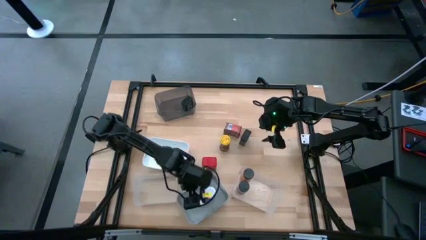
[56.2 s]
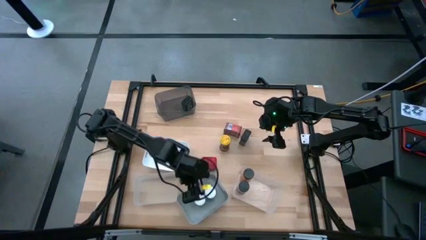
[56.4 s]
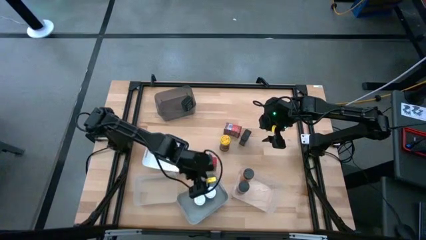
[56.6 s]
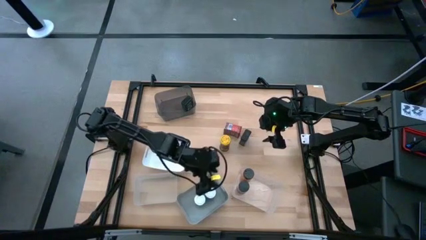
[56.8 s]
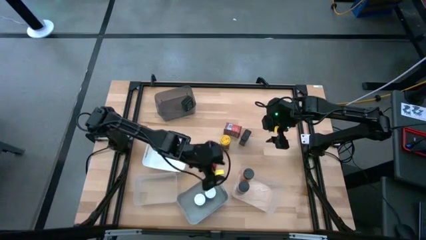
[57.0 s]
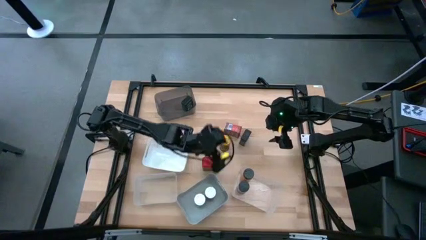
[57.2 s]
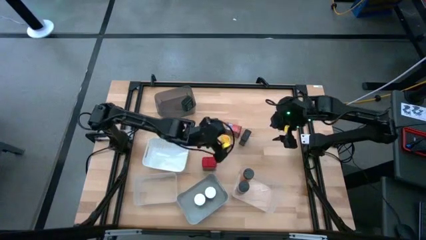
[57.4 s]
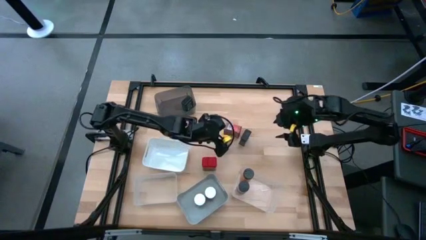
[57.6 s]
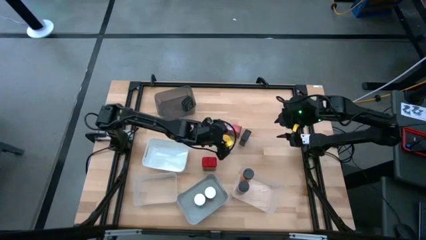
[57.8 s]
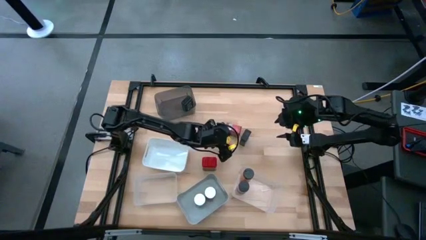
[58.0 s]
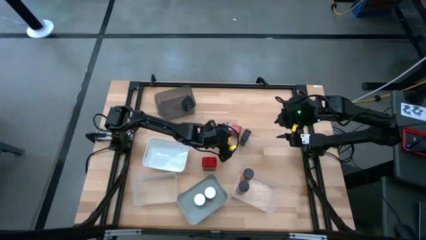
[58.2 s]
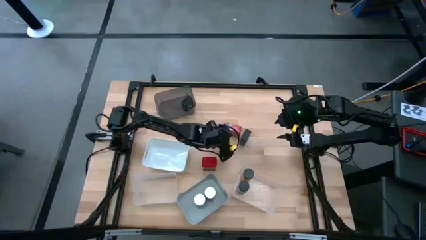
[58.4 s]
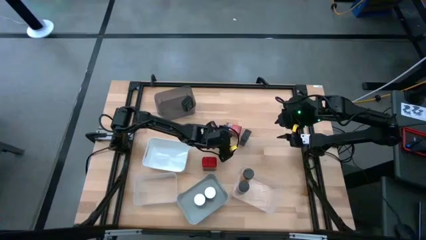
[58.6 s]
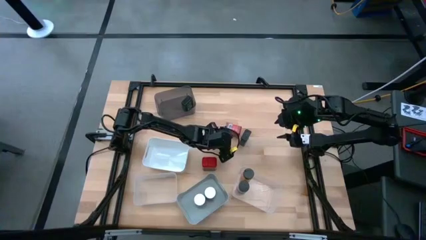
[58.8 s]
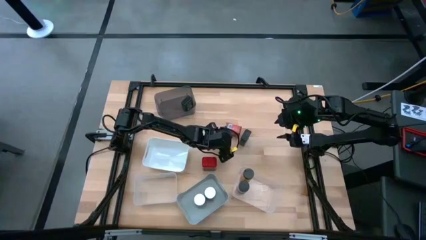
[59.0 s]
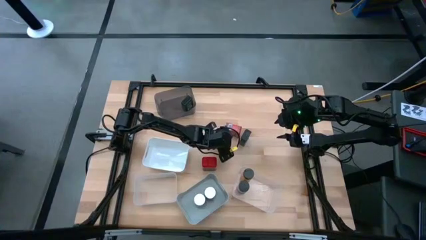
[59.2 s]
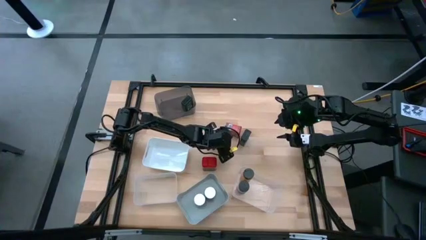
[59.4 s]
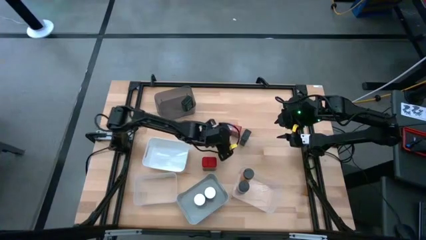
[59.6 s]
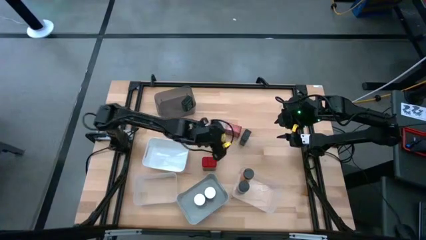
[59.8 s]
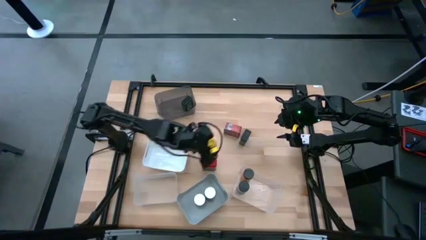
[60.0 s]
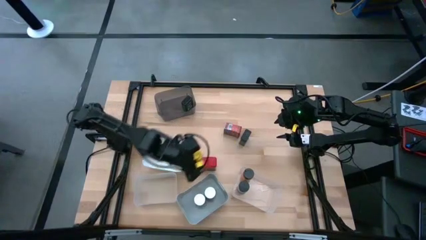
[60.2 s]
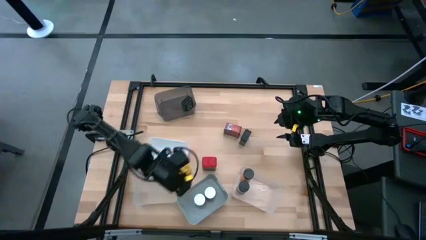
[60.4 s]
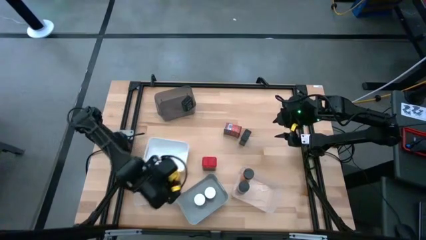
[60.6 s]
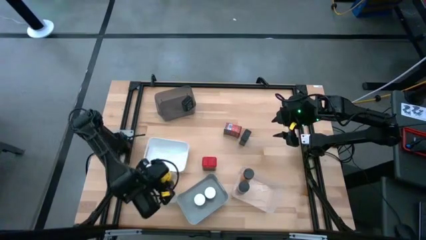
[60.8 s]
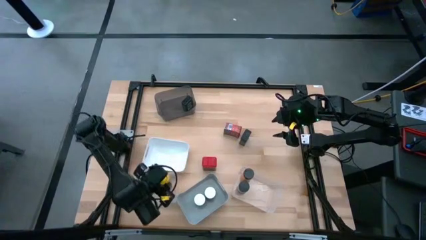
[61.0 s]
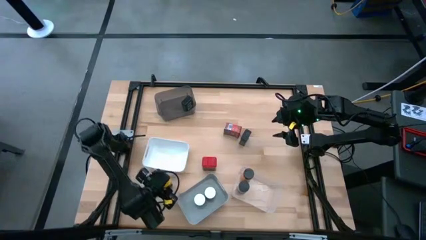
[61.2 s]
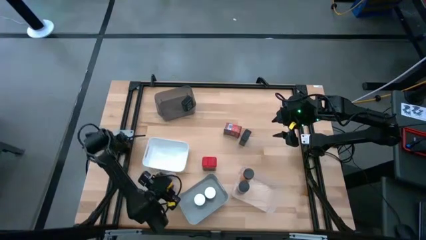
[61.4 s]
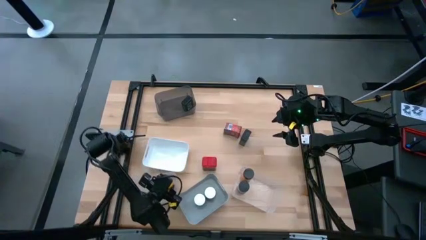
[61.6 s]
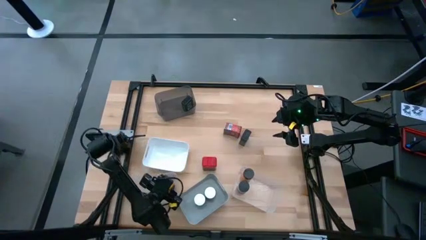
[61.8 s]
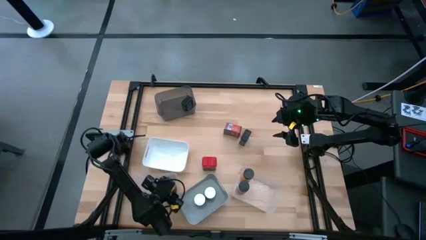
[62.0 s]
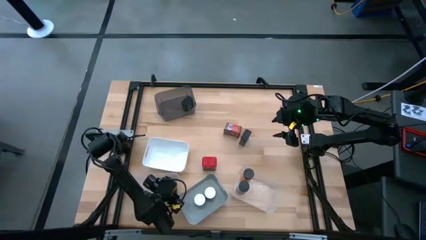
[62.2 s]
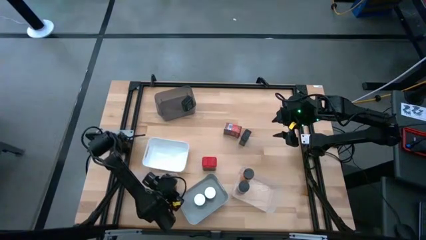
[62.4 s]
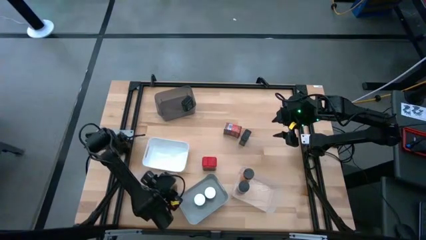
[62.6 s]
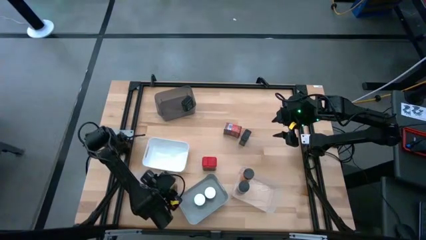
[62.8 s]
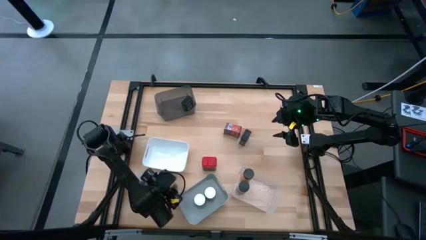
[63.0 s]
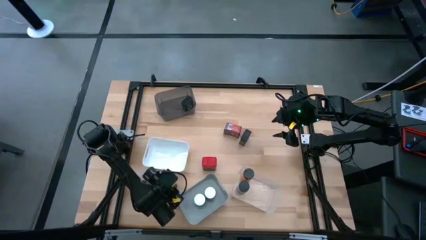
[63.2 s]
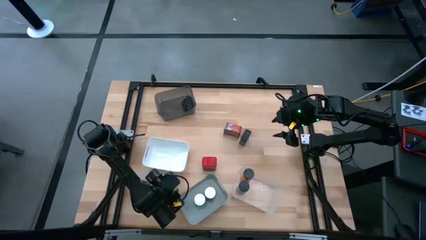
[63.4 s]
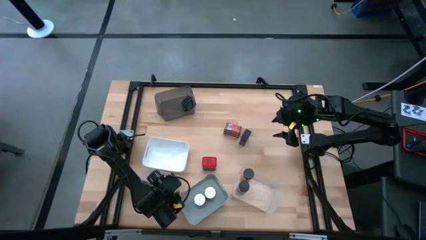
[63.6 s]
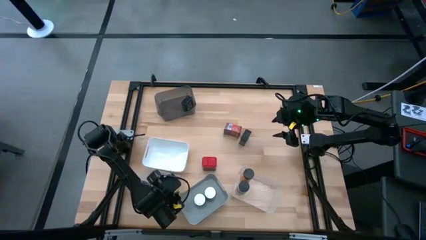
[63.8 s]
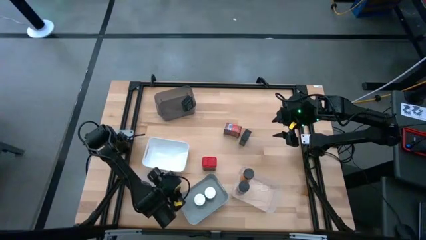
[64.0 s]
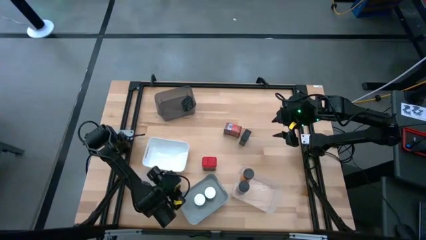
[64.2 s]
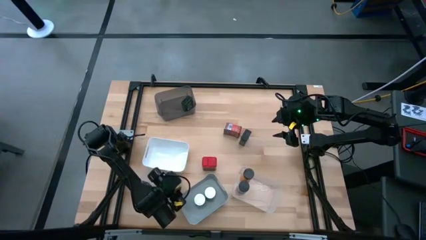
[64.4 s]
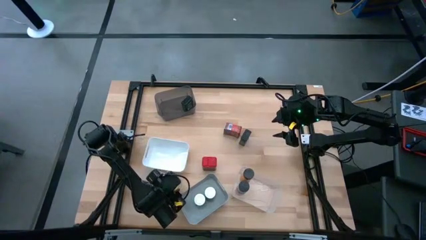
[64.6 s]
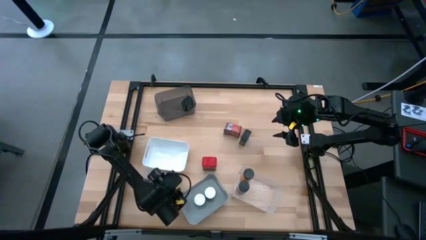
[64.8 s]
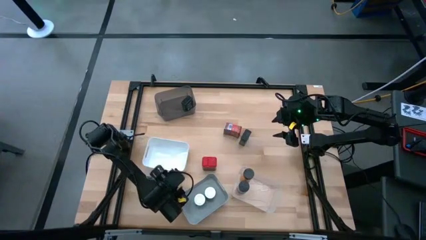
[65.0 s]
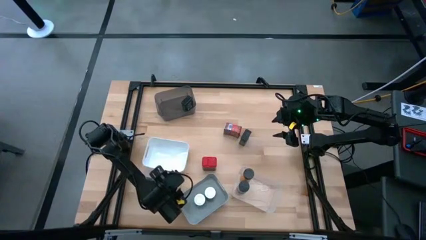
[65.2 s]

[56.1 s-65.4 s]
Task: Sort spices by type
Put the yellow seasoning bottle into the left transparent bin

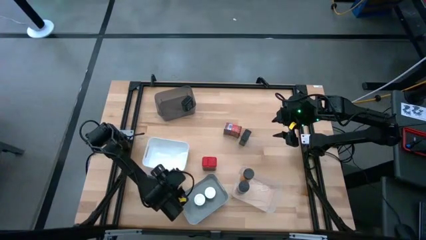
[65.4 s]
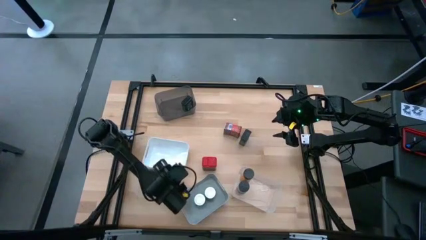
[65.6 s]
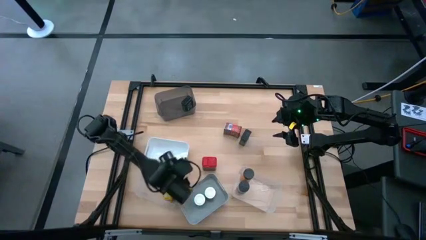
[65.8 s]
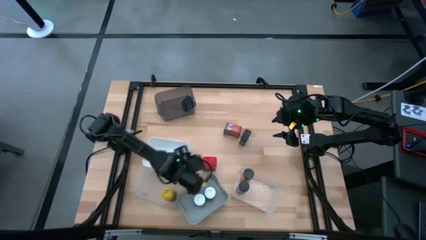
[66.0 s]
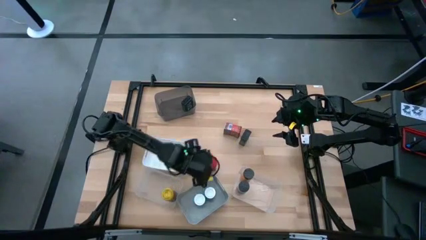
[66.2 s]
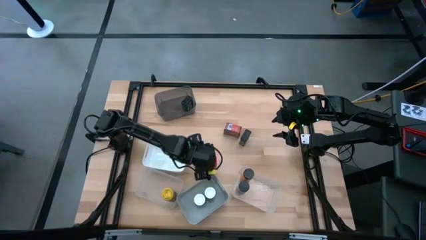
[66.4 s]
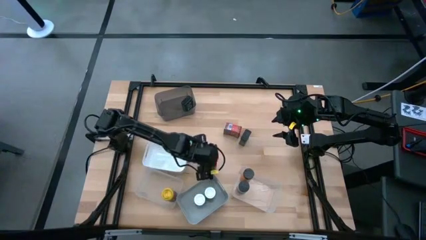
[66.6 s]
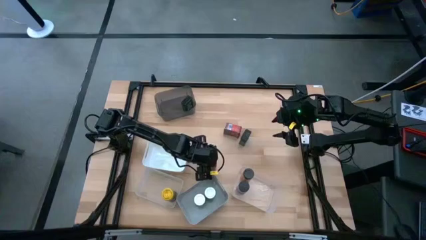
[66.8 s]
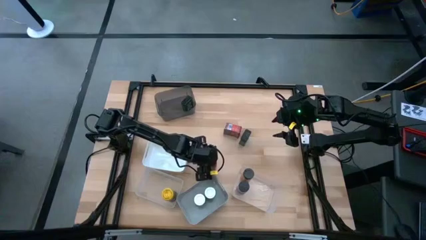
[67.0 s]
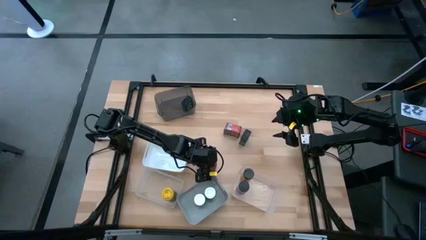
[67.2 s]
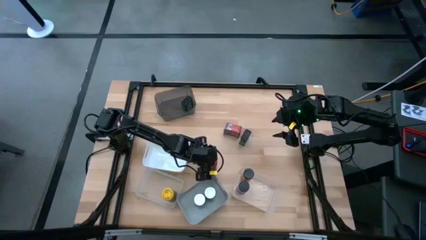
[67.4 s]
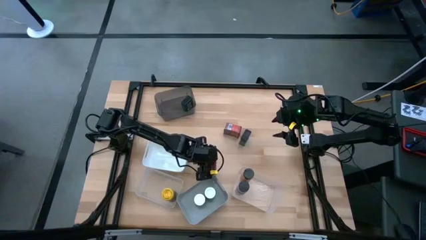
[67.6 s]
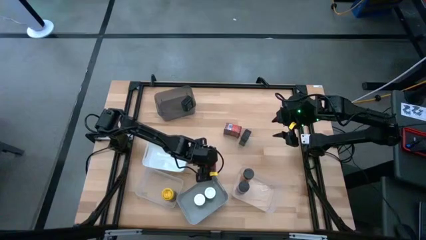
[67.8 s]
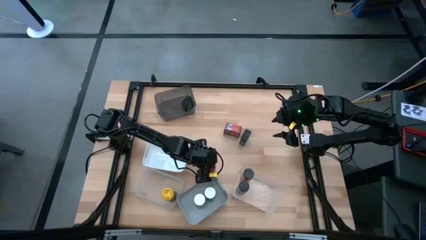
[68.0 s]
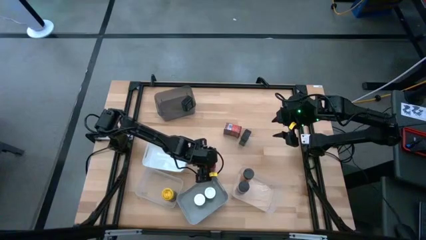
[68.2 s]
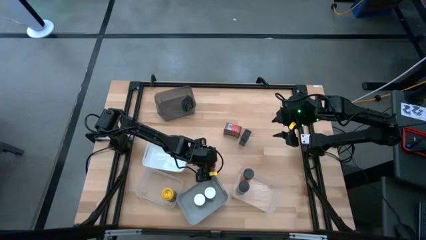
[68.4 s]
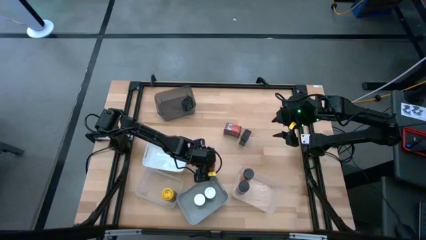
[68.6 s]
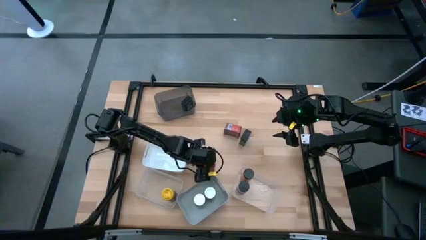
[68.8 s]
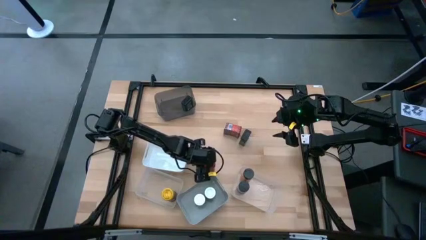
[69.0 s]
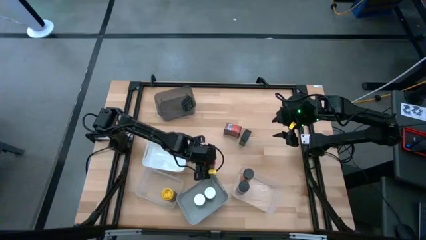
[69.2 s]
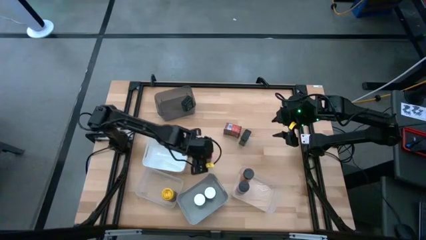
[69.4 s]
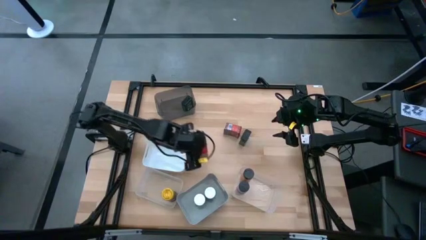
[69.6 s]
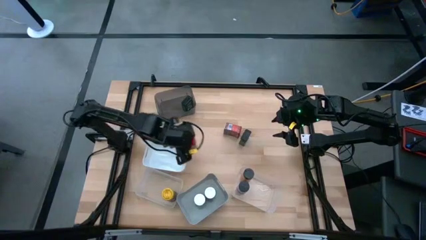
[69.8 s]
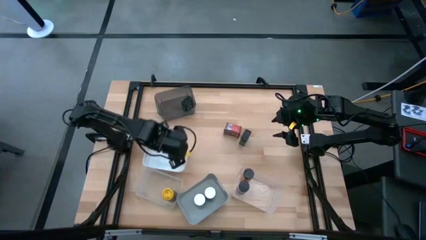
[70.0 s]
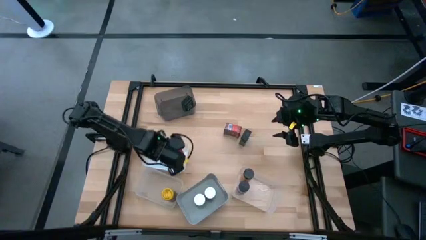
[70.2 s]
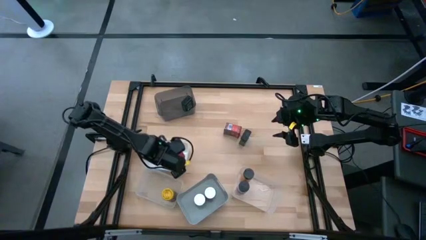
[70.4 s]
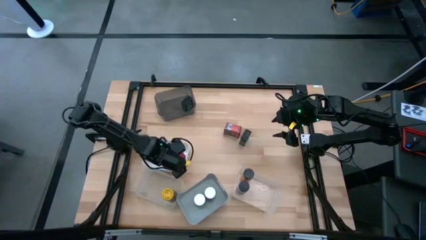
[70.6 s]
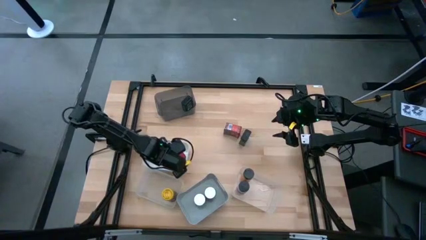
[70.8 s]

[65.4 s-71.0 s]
Put the bottom red seasoning can into the white bin
